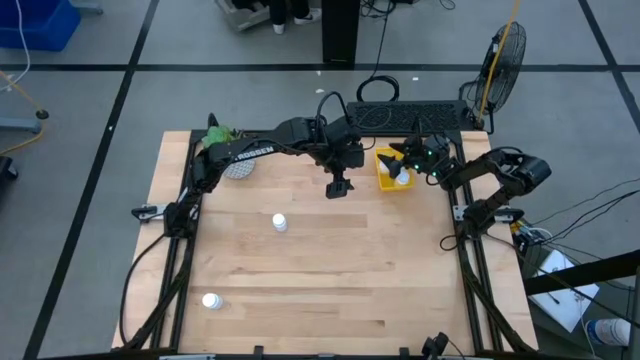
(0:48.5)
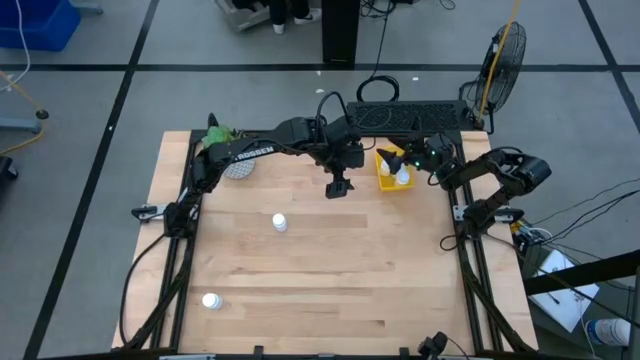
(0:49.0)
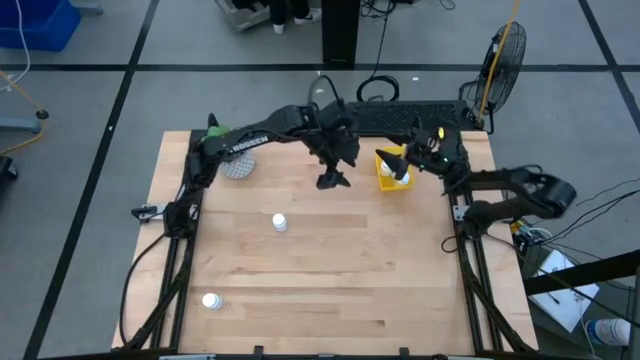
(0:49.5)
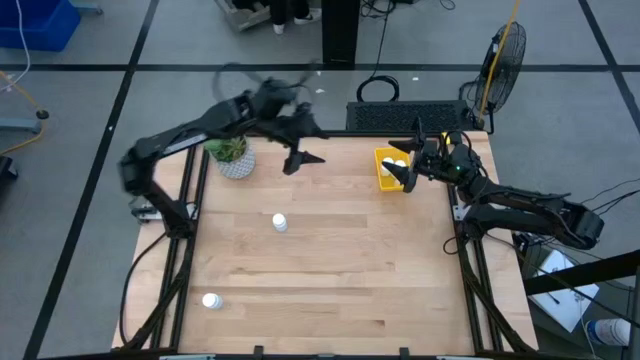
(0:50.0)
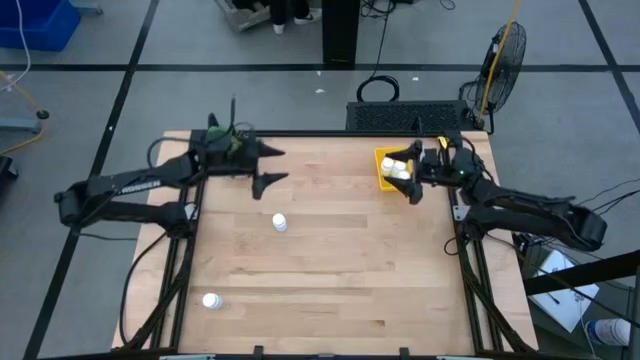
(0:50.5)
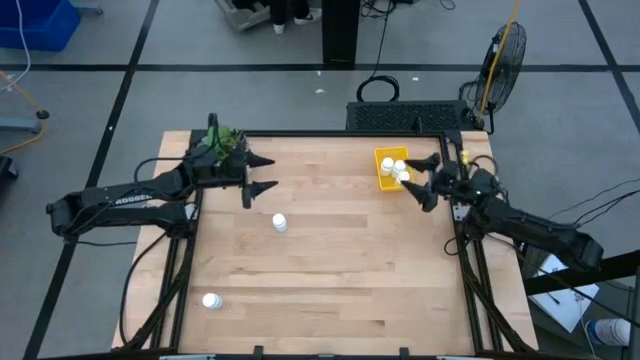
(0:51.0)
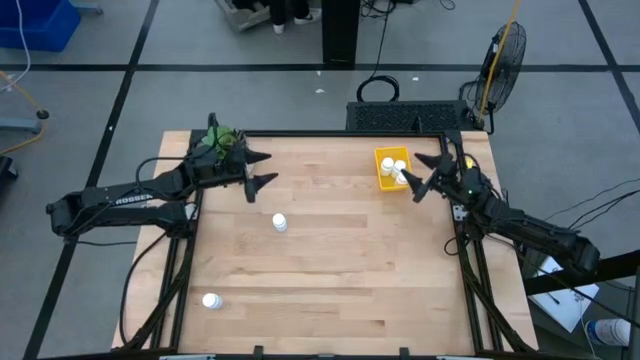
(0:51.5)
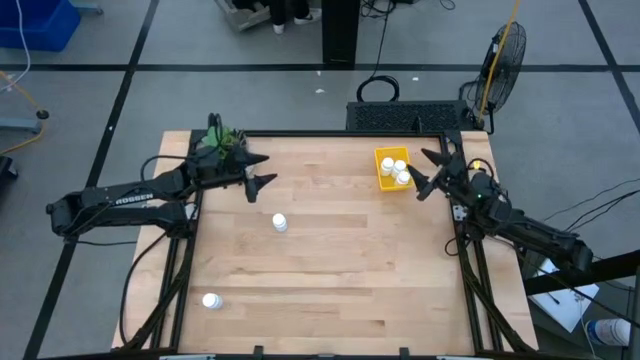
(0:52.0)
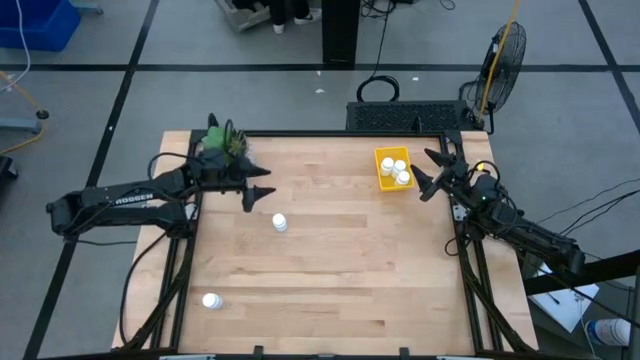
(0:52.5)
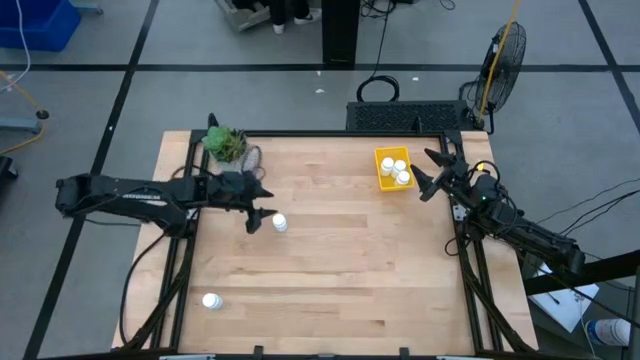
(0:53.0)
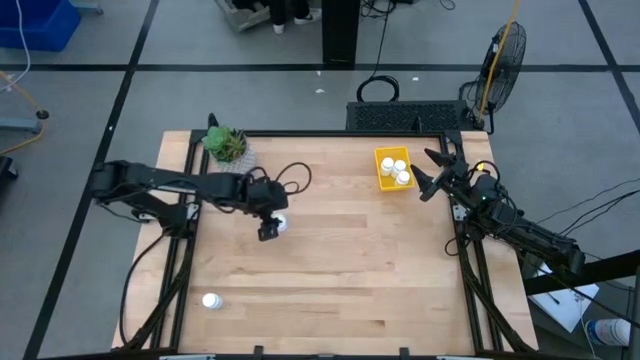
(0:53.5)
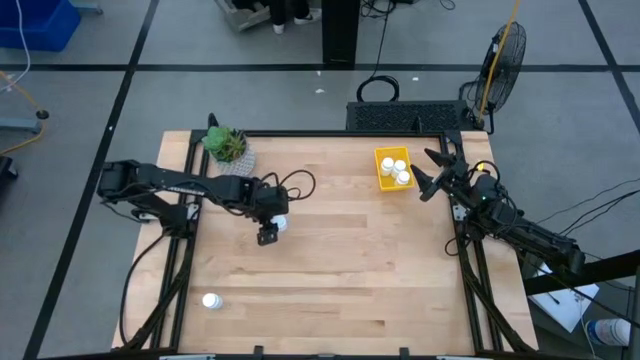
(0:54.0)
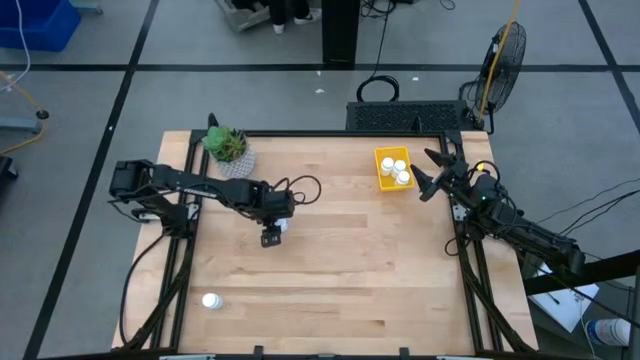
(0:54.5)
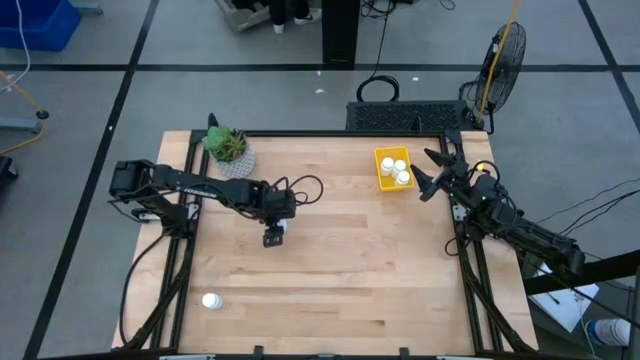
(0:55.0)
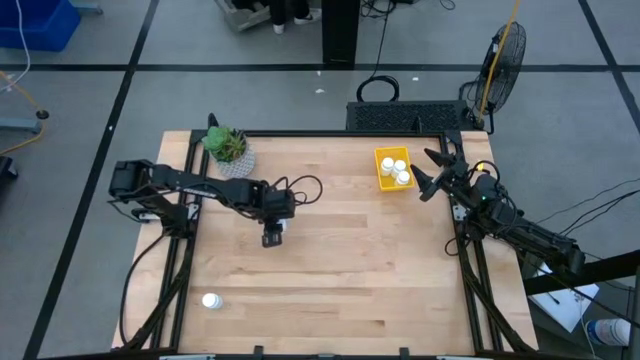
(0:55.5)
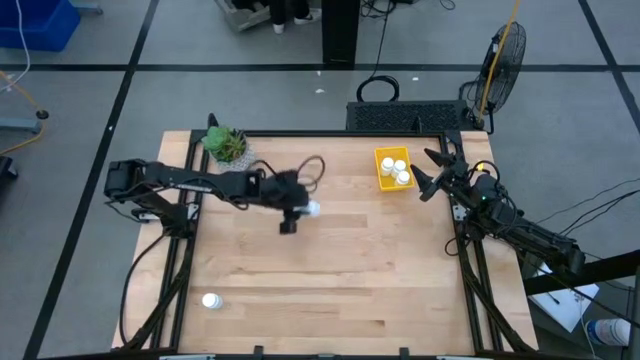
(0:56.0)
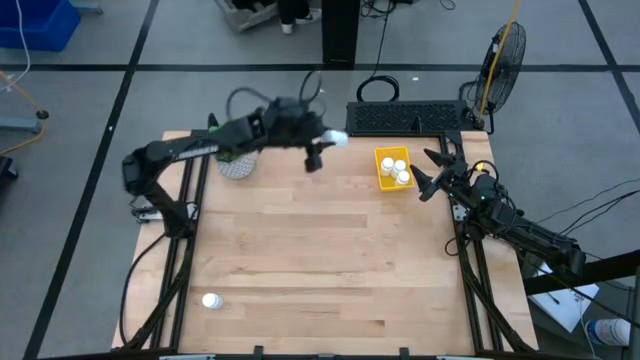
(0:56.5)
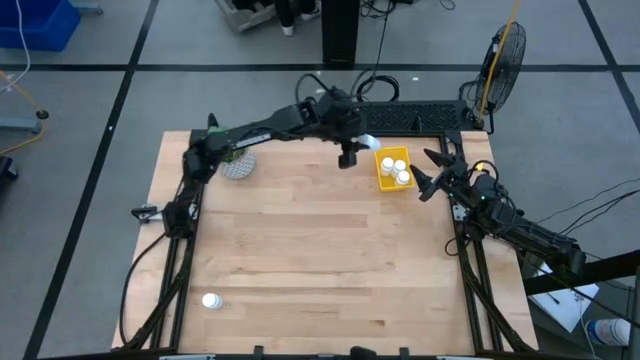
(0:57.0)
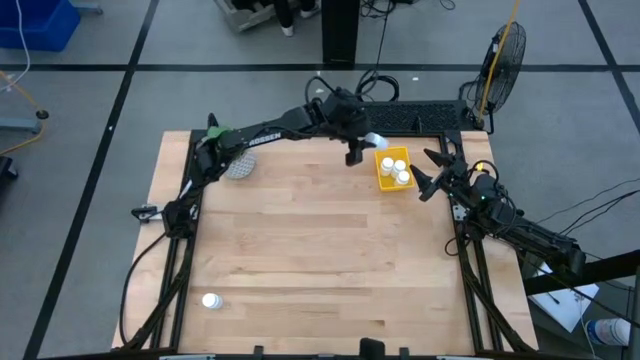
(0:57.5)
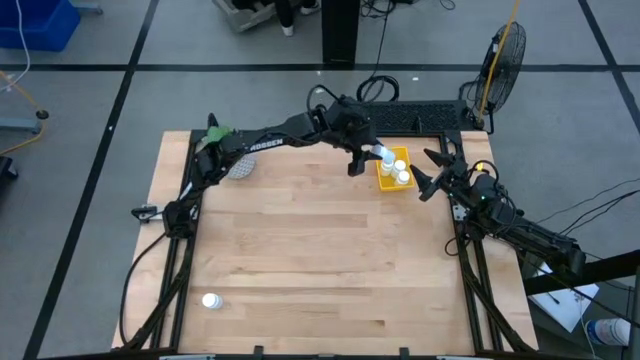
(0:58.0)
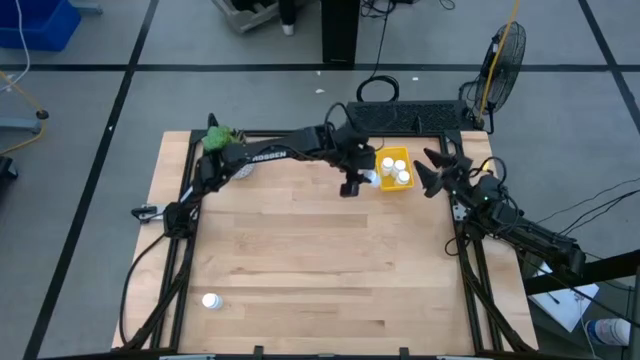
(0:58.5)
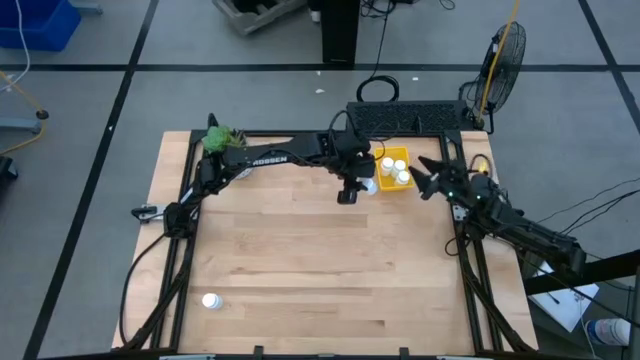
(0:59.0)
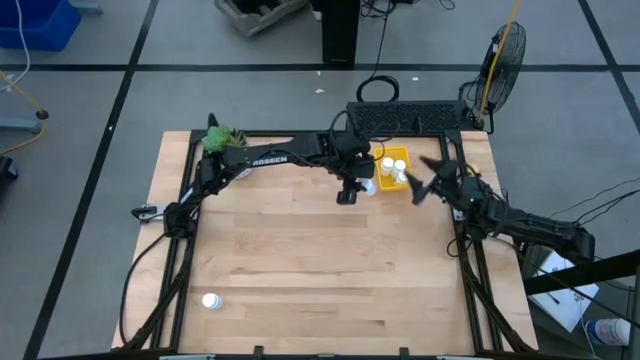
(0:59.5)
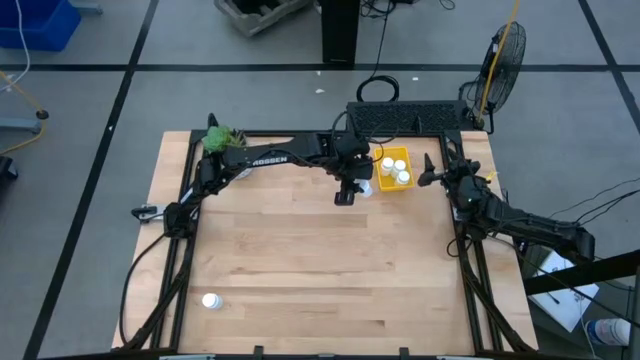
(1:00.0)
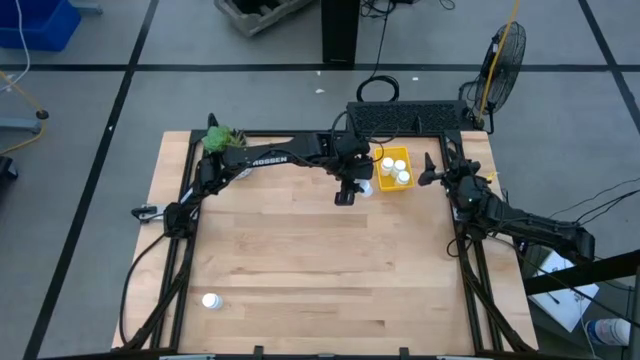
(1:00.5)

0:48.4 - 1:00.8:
Task: Pick and place pill bottles into a basket
Put the top white medicine bottle into the yellow bin

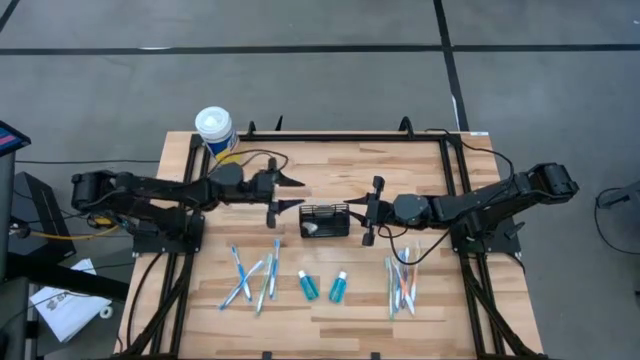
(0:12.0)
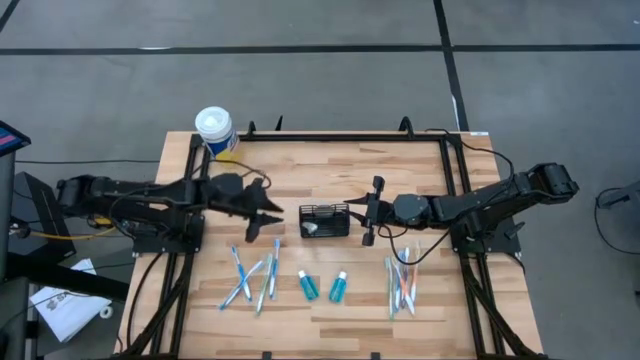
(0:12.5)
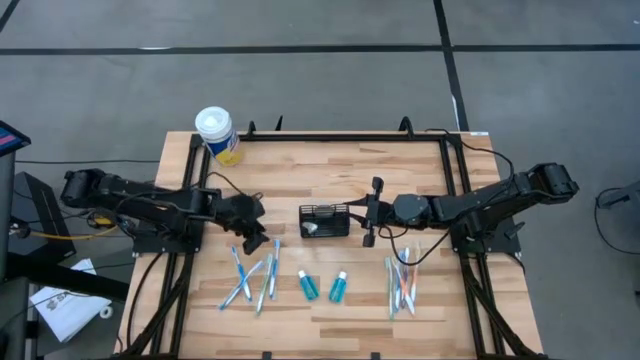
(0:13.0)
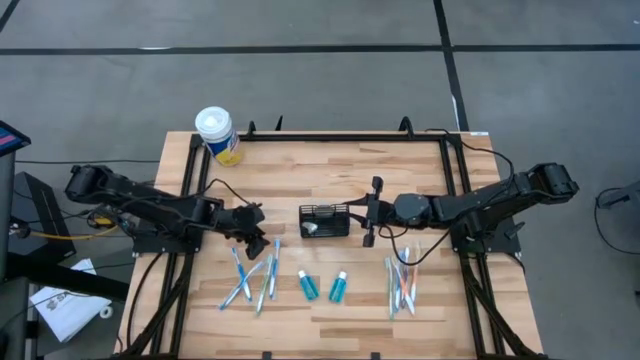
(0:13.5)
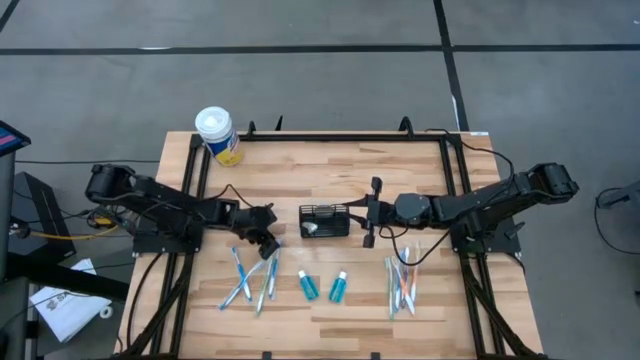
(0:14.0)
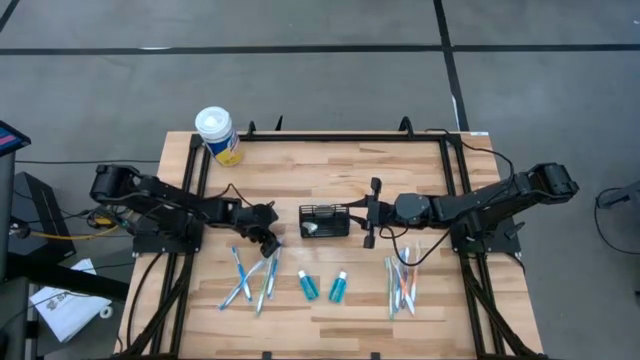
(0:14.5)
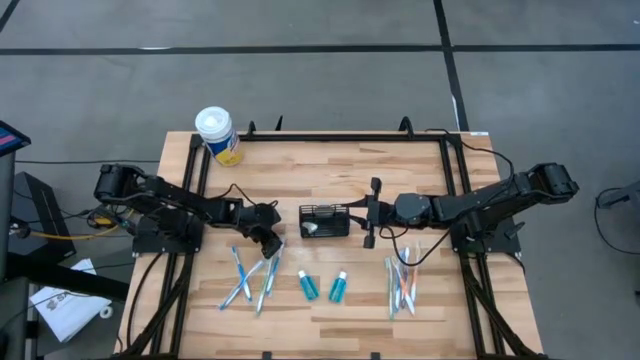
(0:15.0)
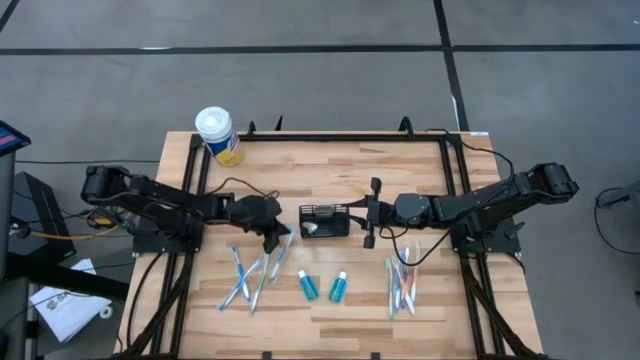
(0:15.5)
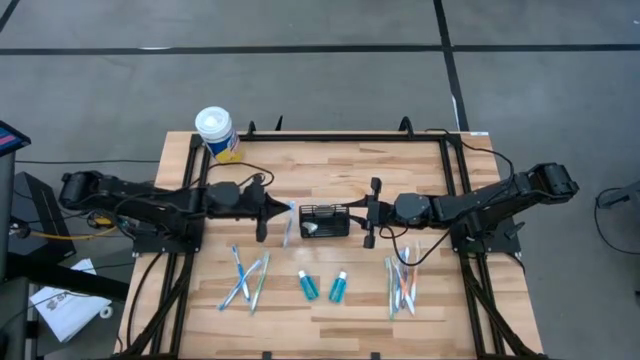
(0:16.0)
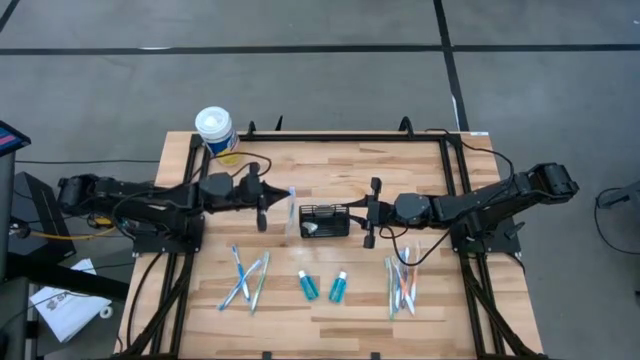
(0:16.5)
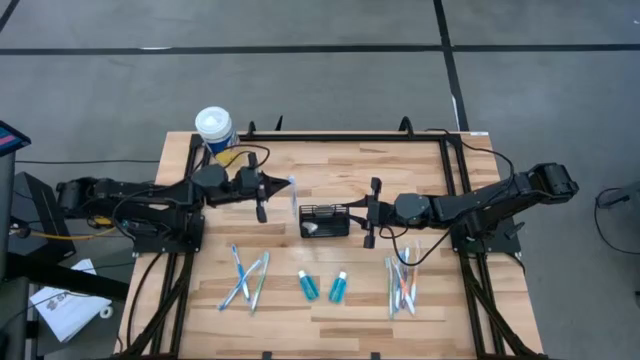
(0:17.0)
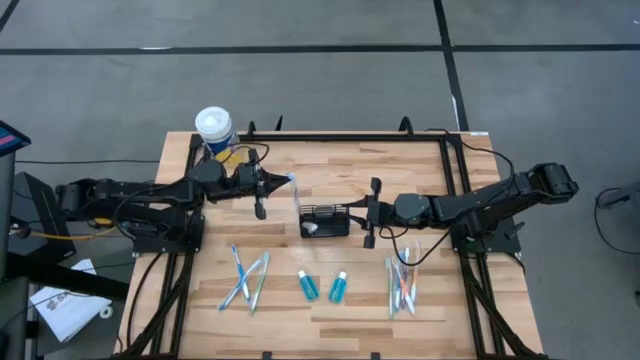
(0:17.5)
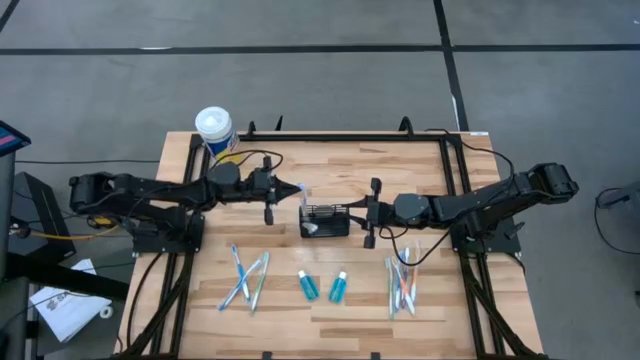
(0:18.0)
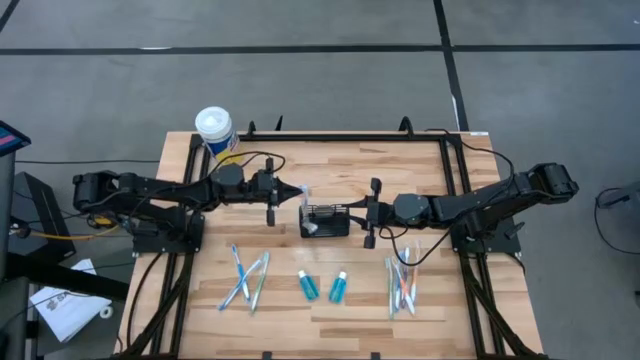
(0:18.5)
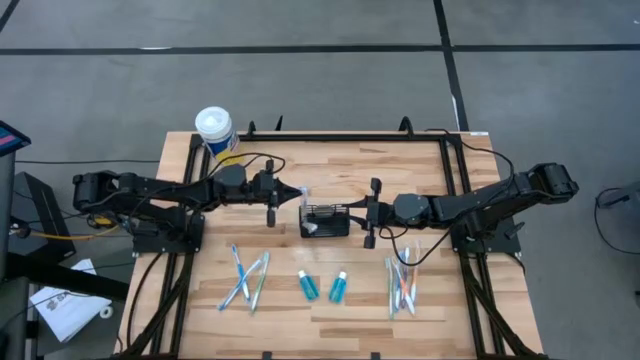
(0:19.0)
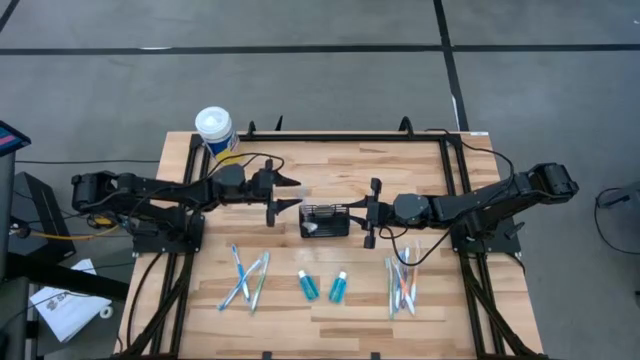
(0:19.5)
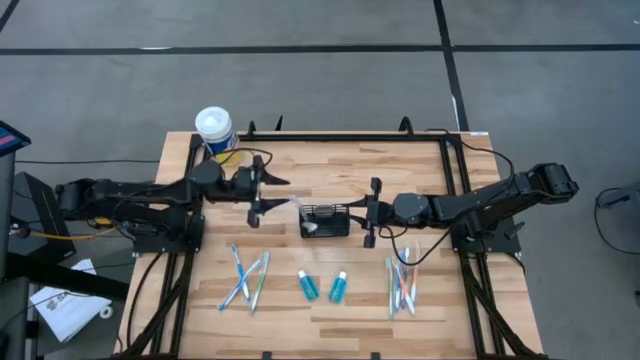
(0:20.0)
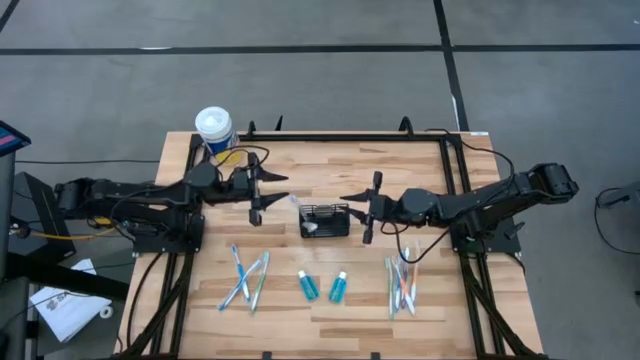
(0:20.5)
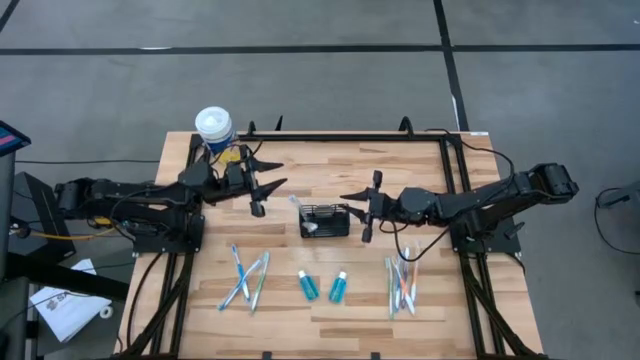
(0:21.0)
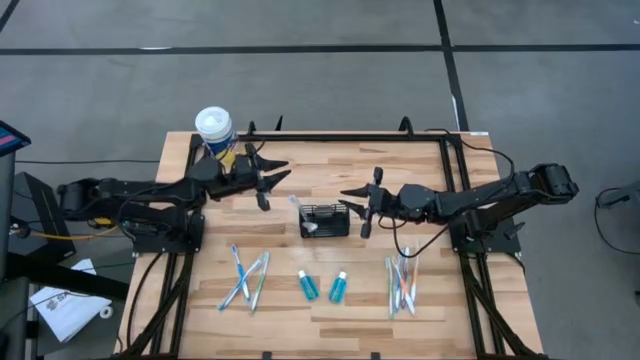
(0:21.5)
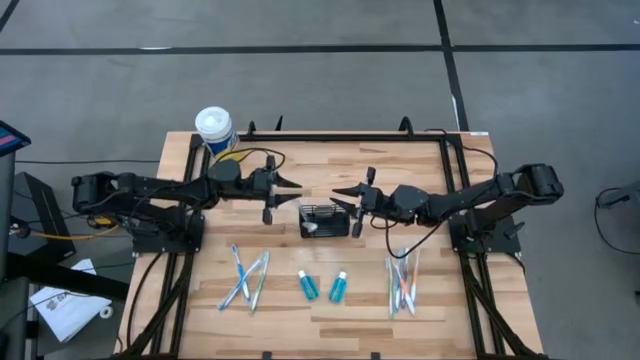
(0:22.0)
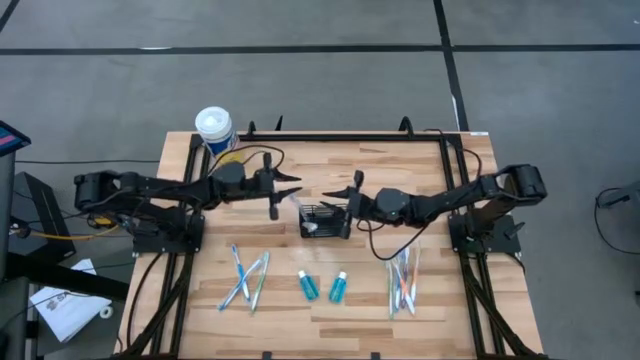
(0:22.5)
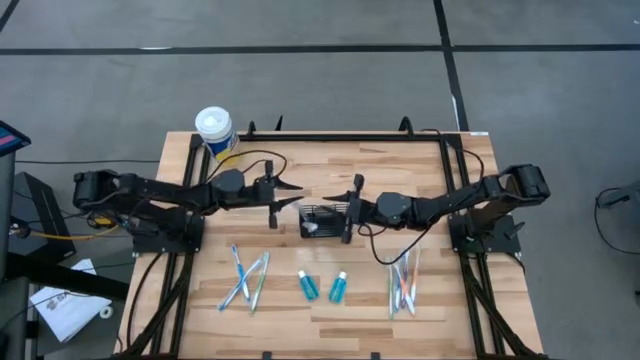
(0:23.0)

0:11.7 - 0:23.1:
Task: Pick & Place toothbrushing station
Put the blue toothbrush into the mesh
